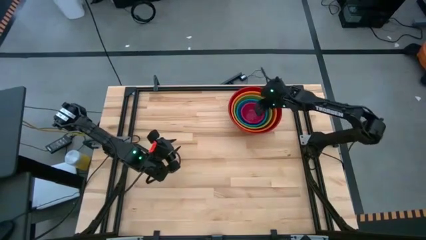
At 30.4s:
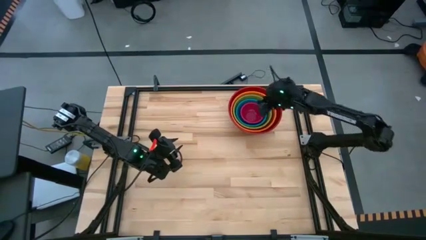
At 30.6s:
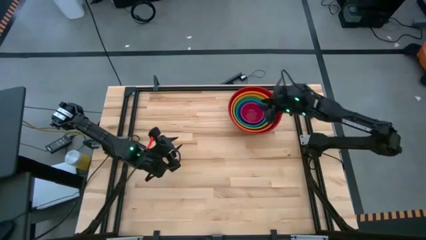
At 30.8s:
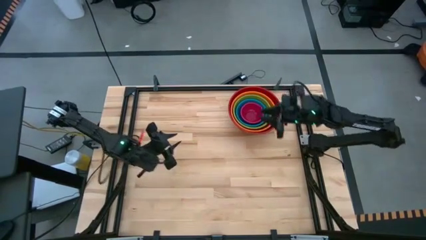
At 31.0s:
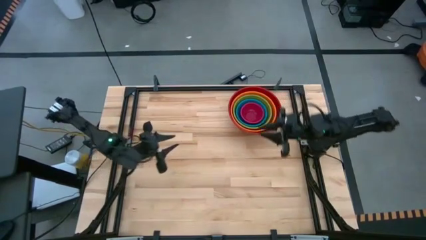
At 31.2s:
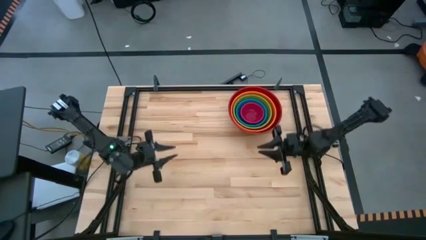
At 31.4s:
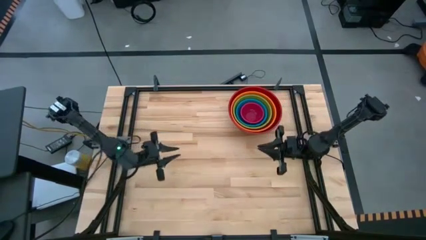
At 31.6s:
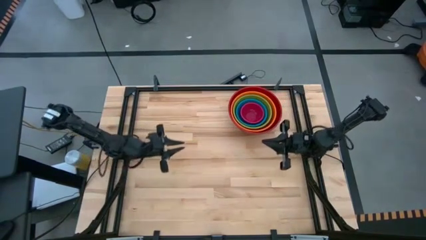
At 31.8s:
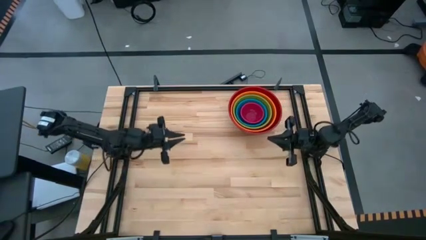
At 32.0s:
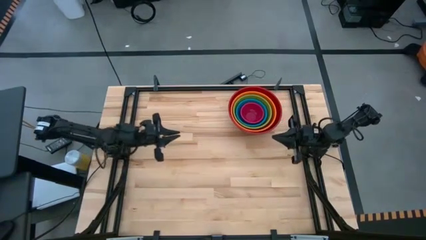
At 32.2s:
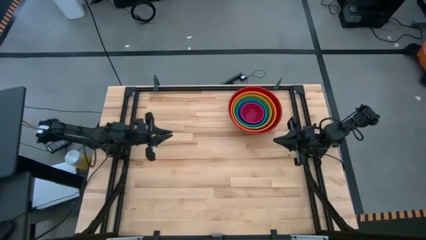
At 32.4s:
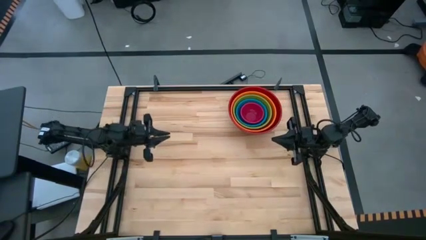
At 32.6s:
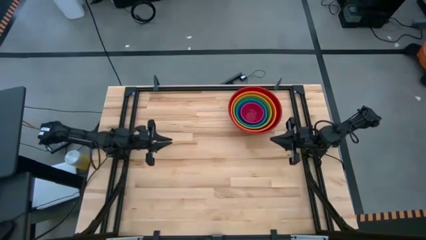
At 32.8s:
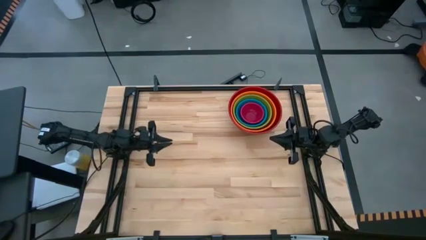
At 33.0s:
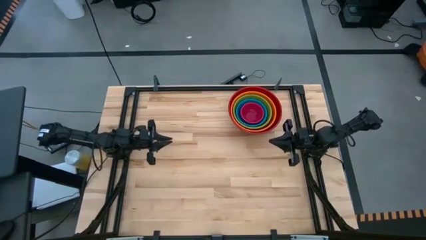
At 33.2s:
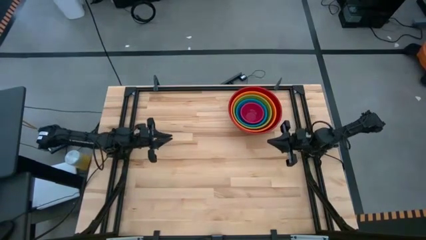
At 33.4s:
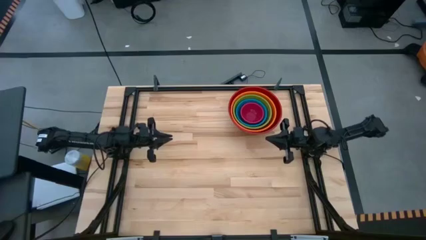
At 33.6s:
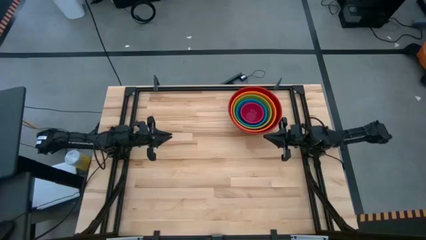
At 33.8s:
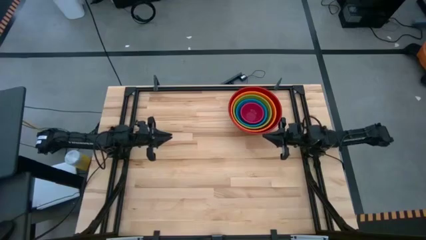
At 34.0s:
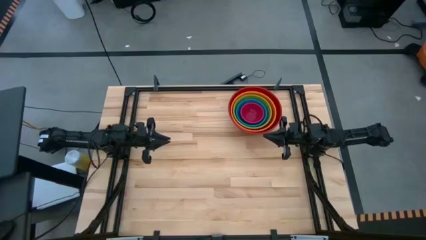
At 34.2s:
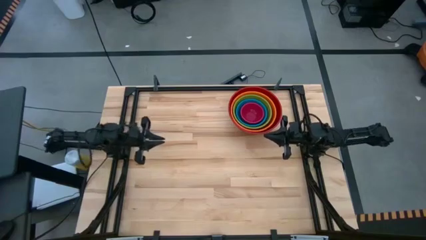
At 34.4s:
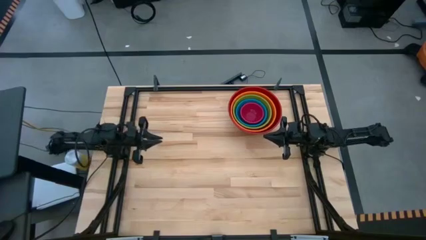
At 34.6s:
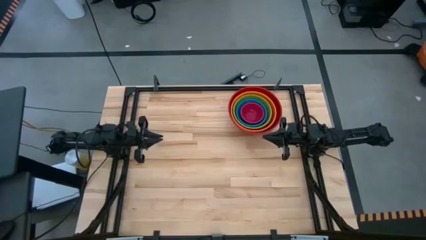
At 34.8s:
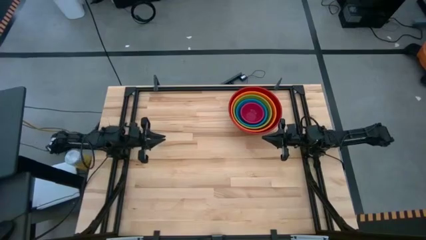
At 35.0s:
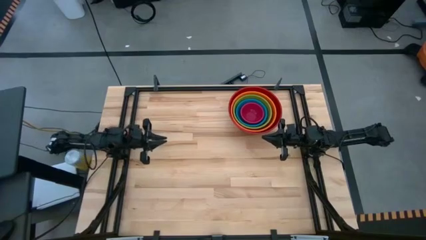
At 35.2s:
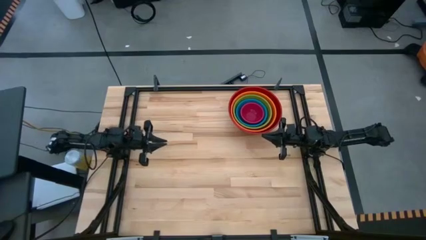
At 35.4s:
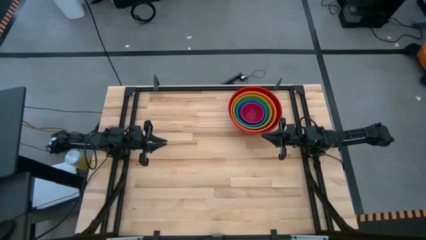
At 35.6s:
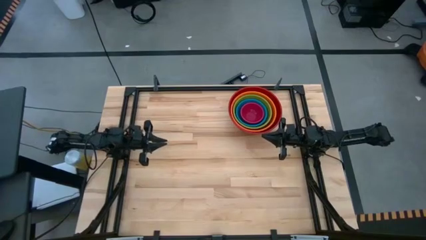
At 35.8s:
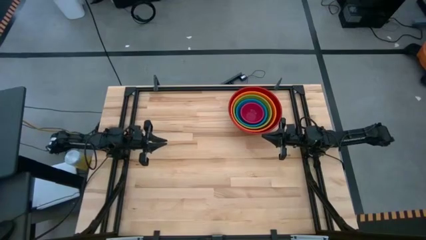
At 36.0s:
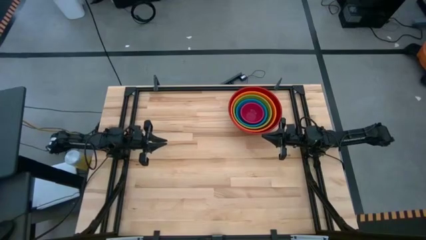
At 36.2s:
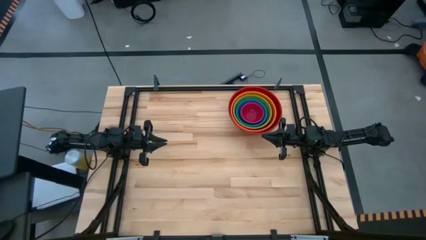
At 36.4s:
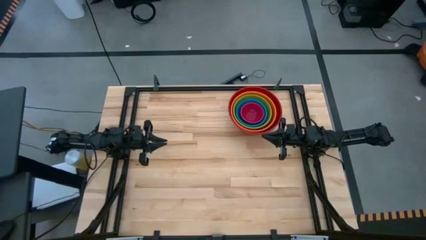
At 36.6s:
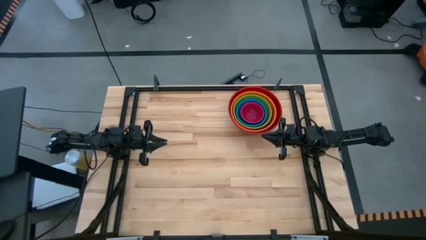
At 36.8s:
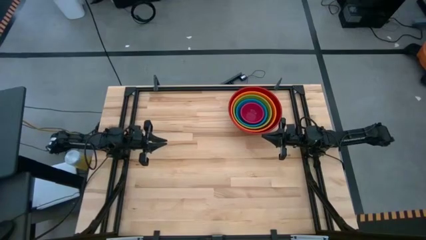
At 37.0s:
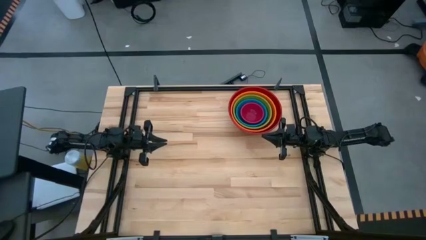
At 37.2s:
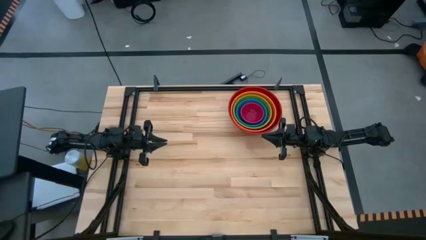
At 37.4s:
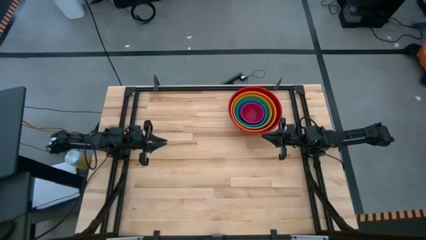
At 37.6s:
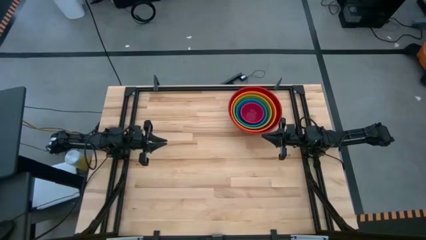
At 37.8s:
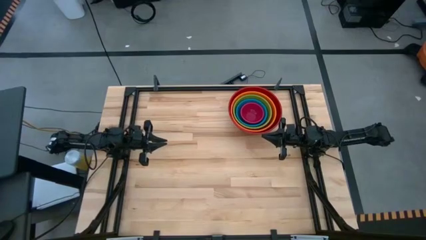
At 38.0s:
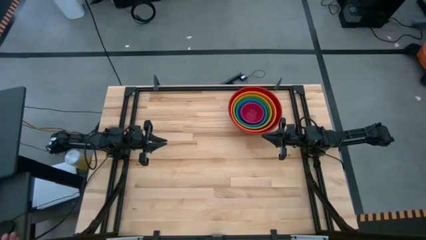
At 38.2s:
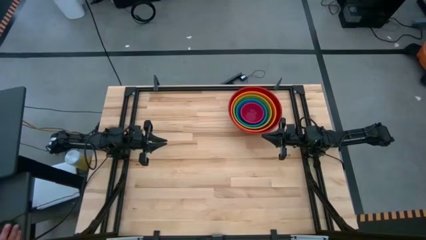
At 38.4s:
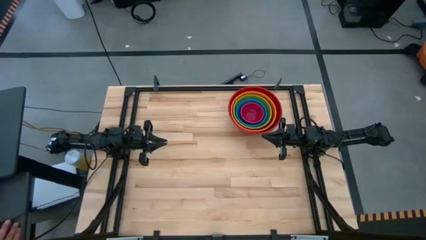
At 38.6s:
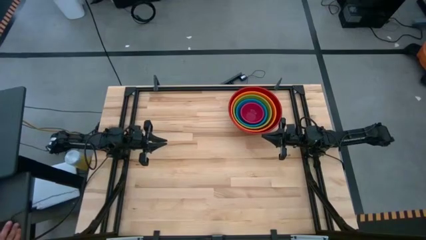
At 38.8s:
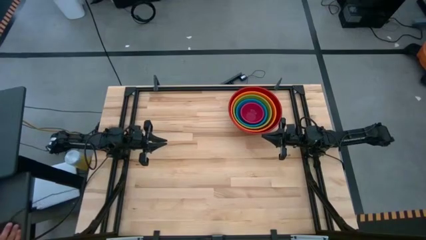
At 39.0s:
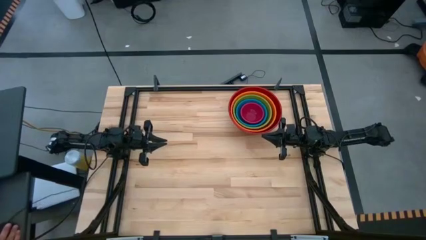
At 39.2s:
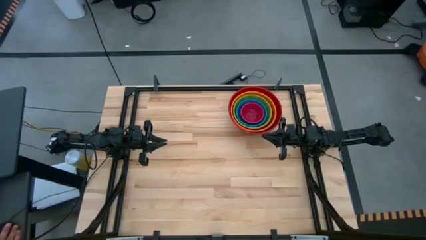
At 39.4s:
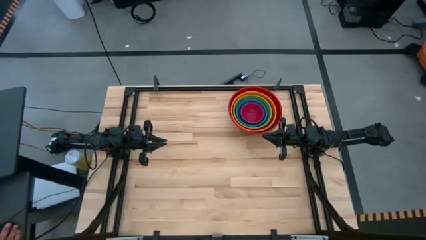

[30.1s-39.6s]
Return to Home Position

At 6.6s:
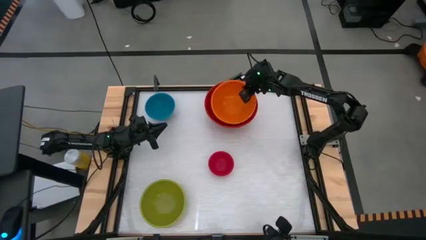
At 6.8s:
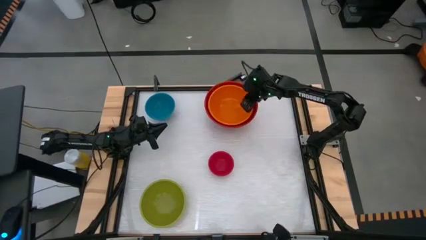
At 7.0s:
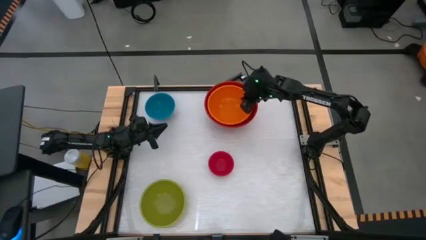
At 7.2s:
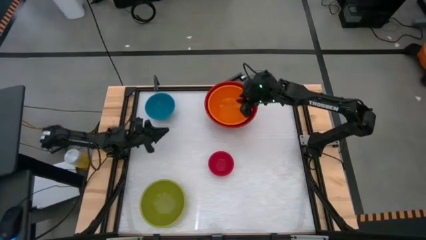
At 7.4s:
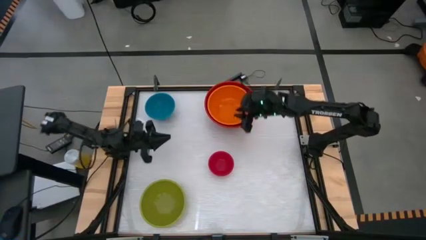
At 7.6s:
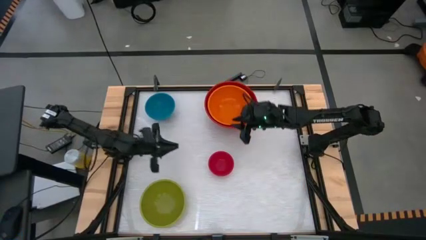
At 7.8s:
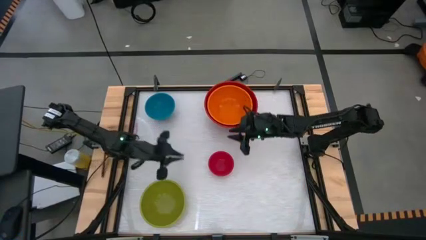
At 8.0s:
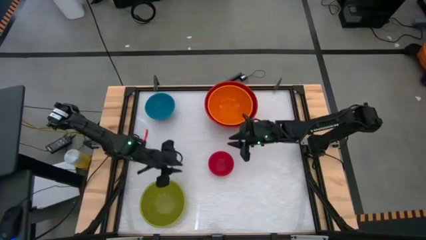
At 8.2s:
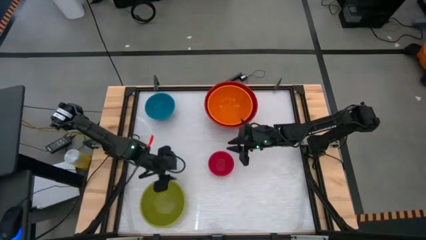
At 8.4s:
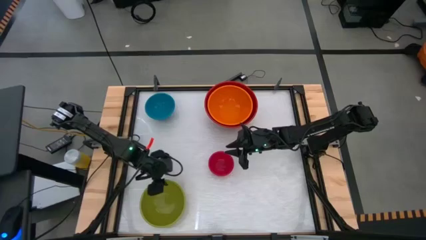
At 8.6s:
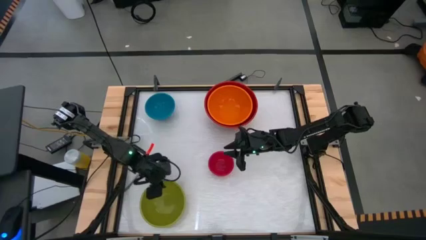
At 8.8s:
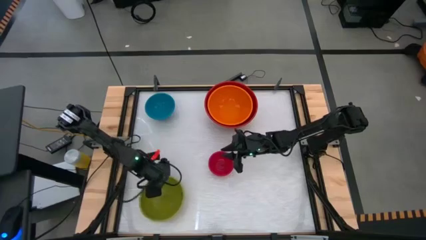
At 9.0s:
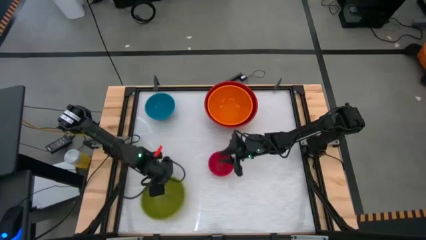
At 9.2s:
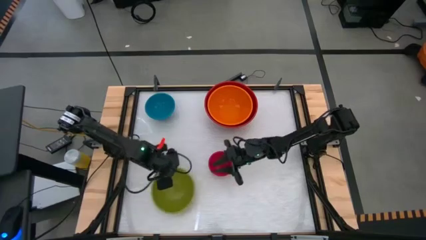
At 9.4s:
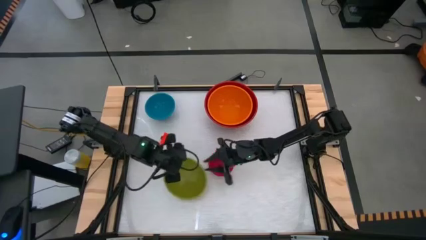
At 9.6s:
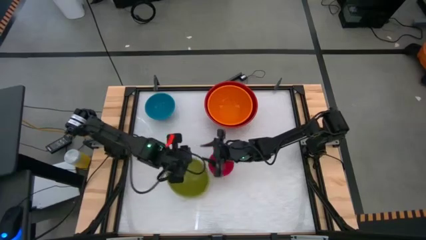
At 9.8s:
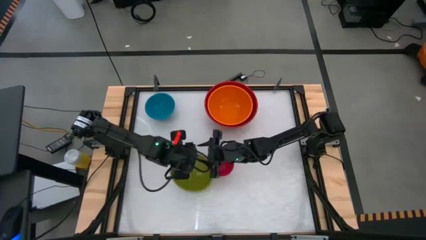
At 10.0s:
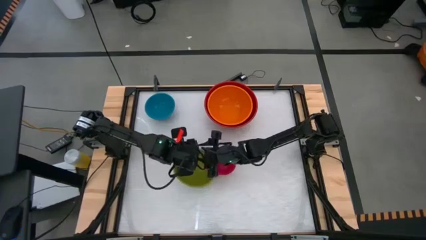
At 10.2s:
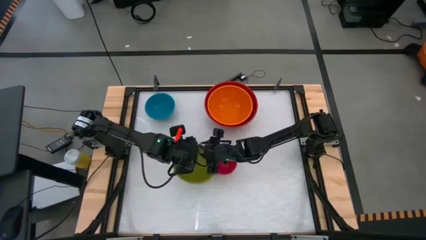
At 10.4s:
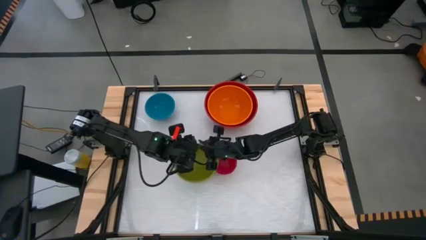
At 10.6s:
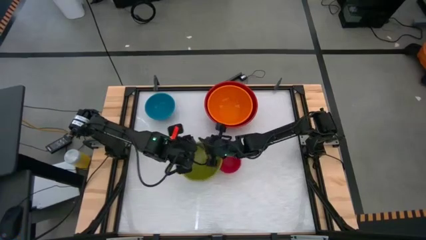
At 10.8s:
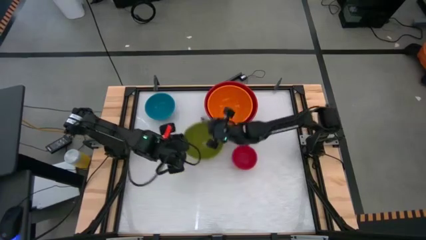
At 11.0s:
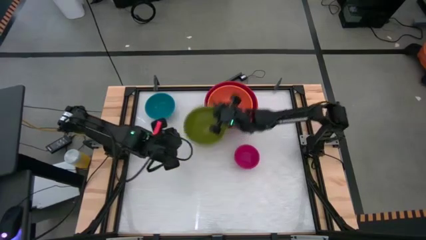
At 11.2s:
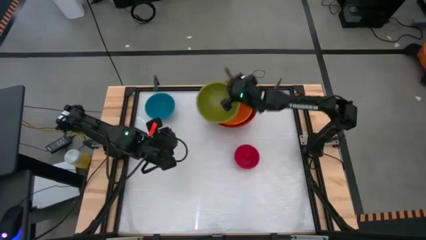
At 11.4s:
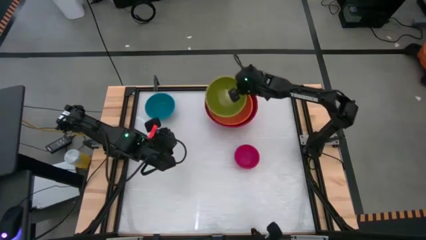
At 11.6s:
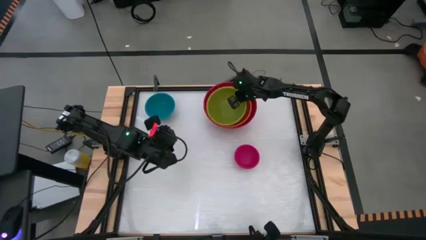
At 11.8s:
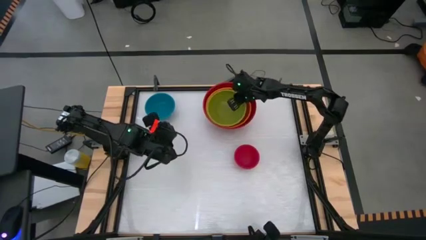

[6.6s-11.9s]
Stack the green bowl on top of the orange bowl
